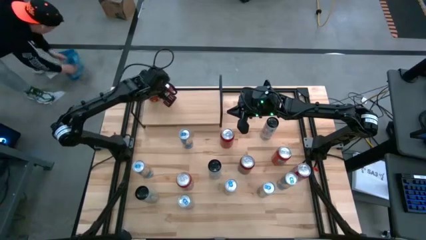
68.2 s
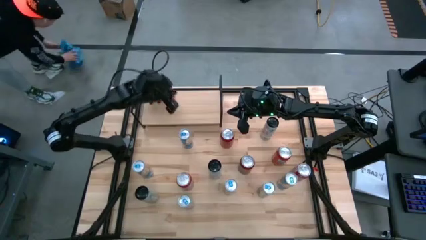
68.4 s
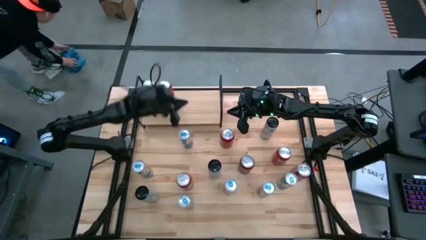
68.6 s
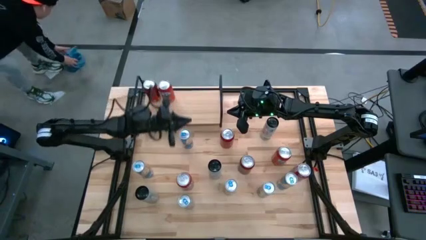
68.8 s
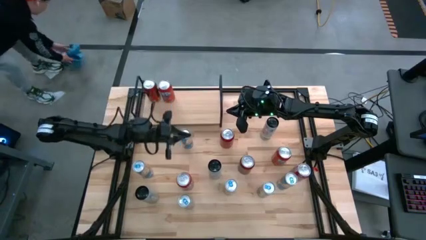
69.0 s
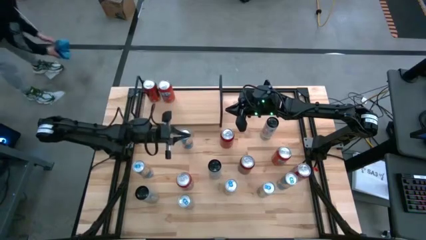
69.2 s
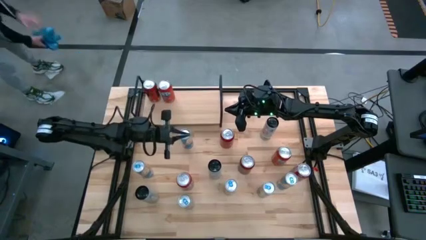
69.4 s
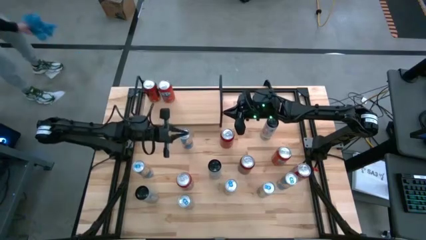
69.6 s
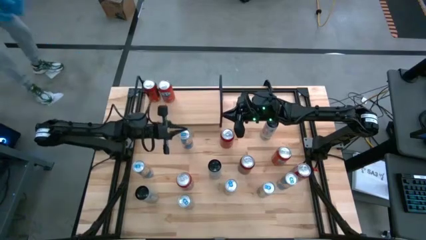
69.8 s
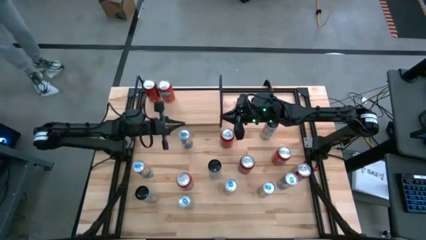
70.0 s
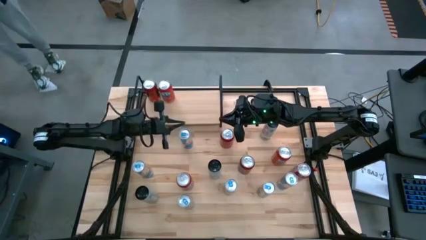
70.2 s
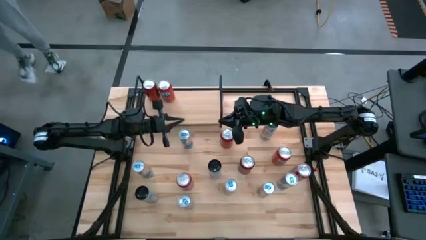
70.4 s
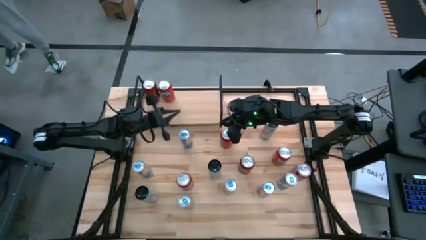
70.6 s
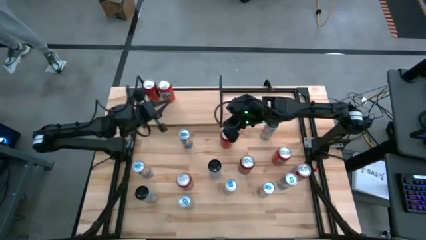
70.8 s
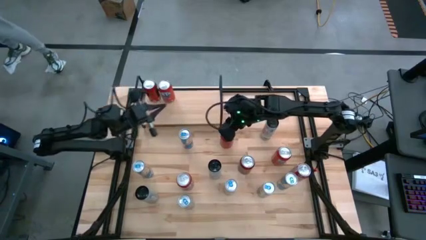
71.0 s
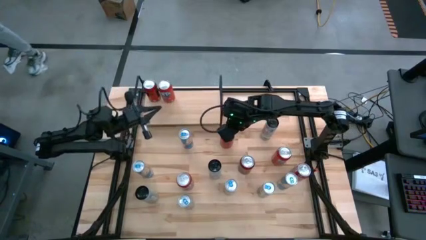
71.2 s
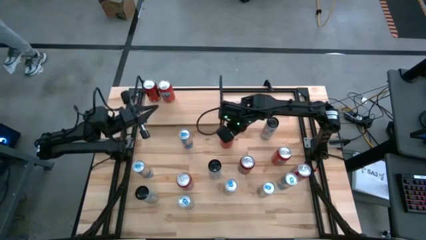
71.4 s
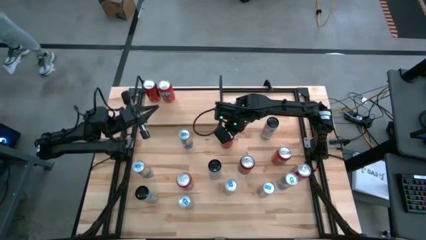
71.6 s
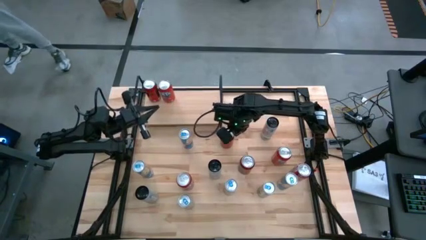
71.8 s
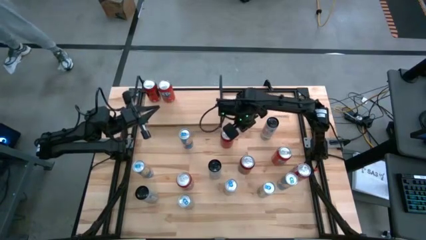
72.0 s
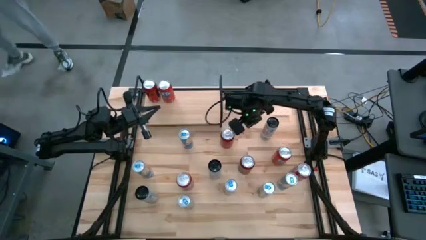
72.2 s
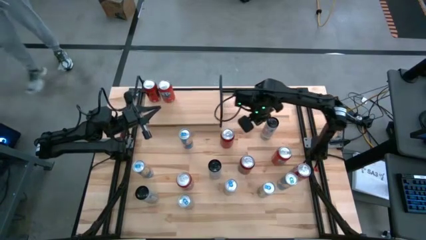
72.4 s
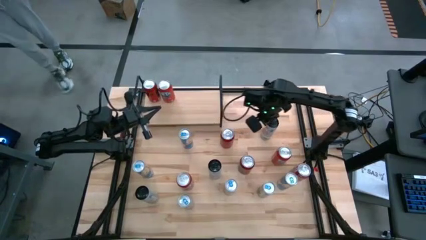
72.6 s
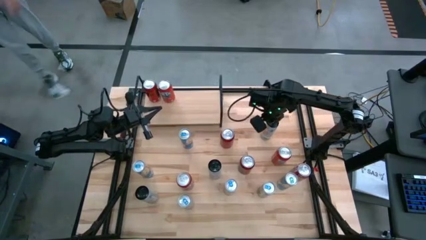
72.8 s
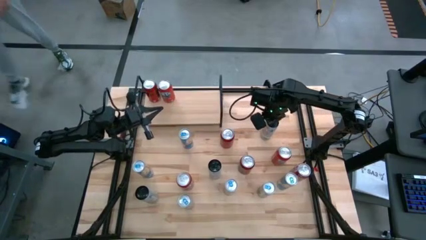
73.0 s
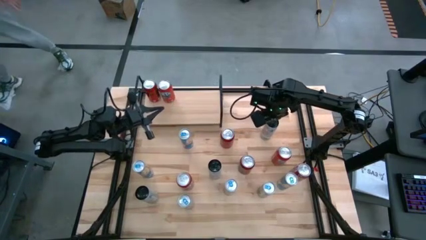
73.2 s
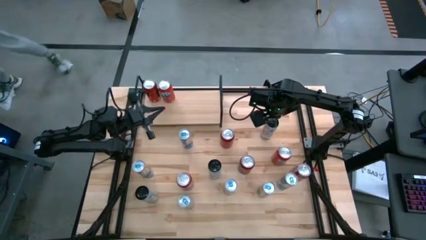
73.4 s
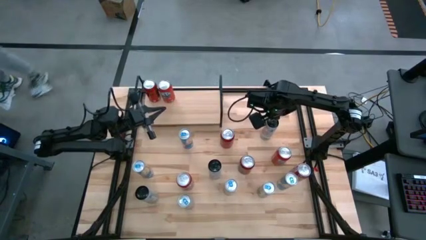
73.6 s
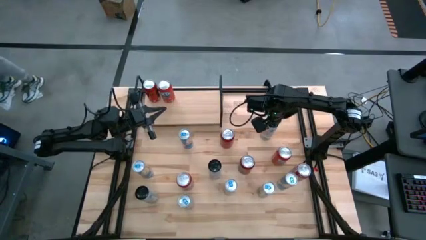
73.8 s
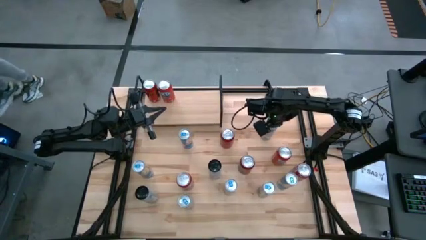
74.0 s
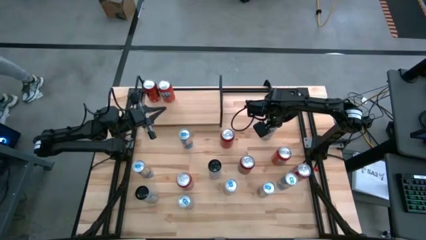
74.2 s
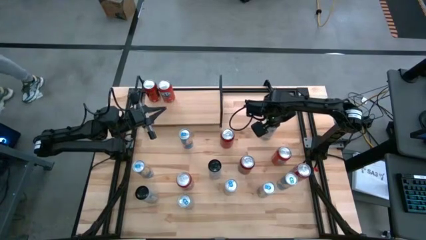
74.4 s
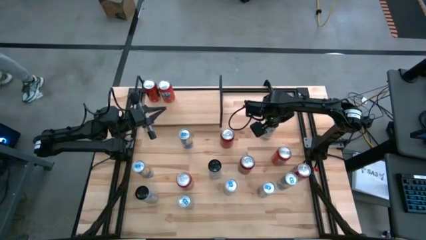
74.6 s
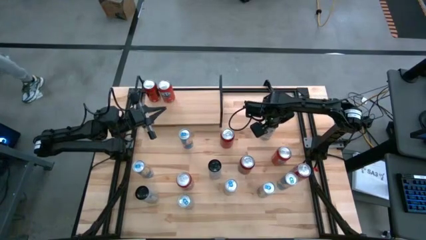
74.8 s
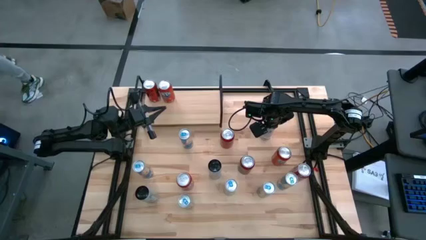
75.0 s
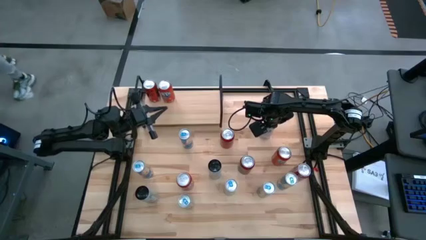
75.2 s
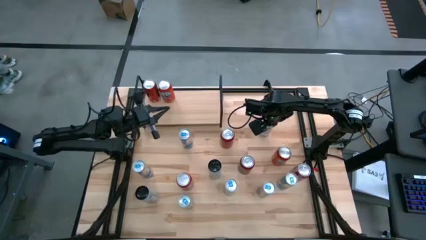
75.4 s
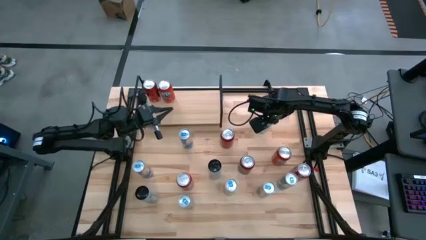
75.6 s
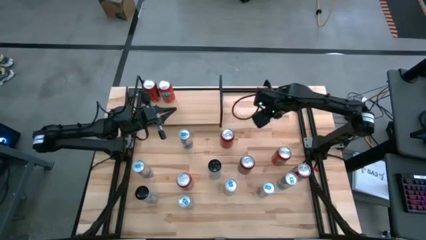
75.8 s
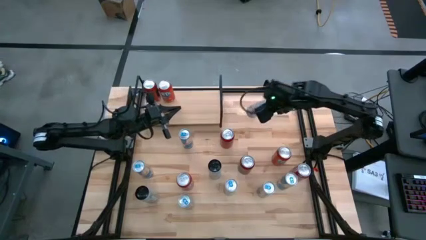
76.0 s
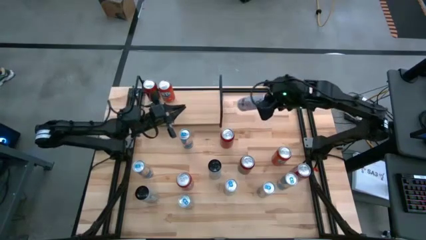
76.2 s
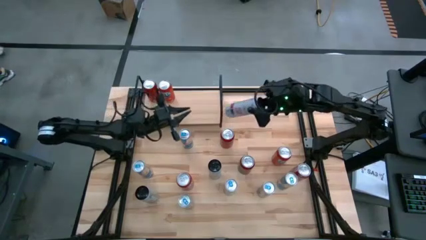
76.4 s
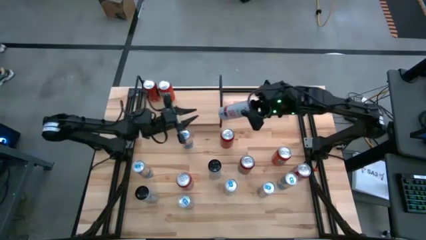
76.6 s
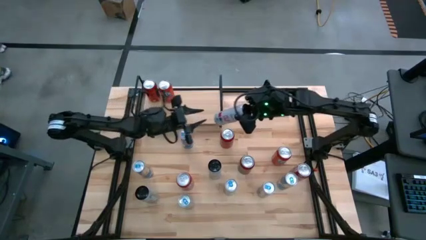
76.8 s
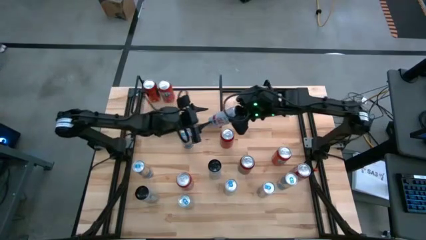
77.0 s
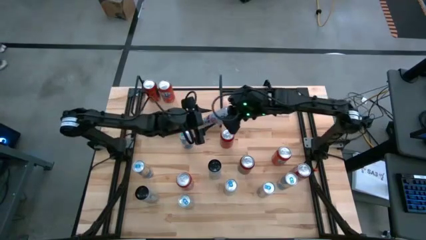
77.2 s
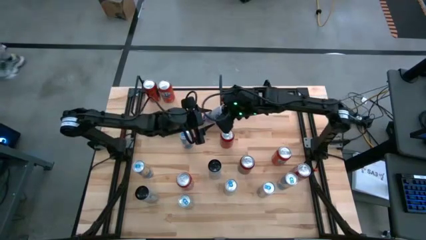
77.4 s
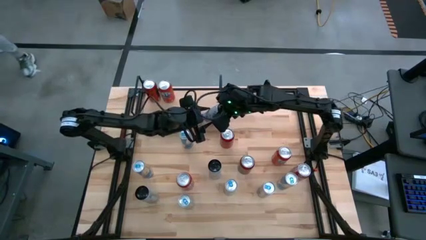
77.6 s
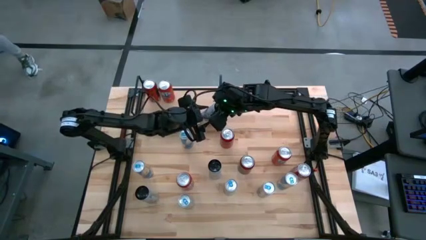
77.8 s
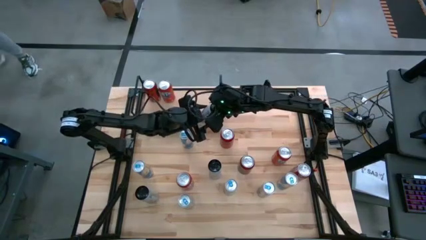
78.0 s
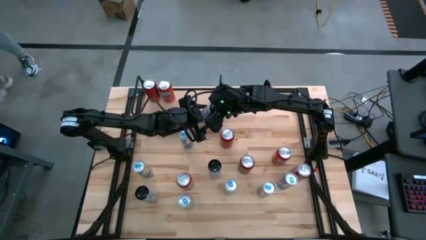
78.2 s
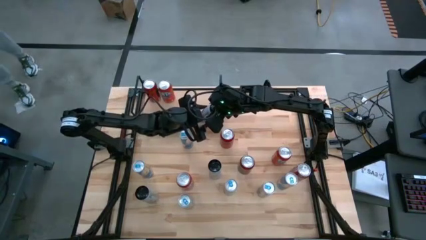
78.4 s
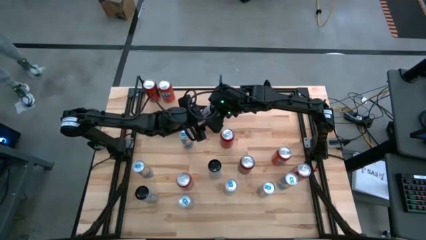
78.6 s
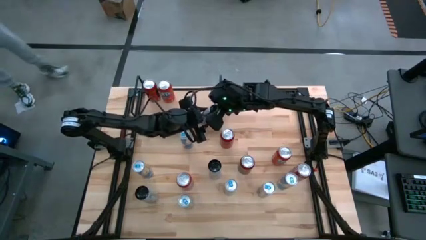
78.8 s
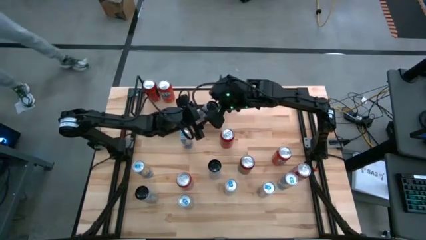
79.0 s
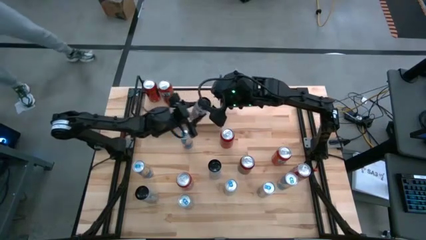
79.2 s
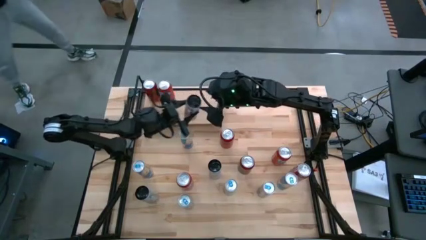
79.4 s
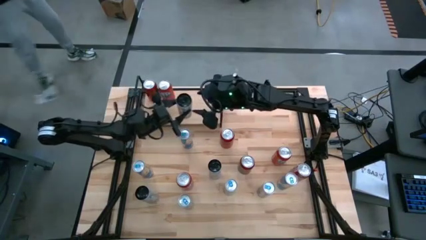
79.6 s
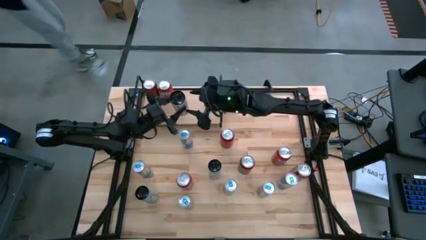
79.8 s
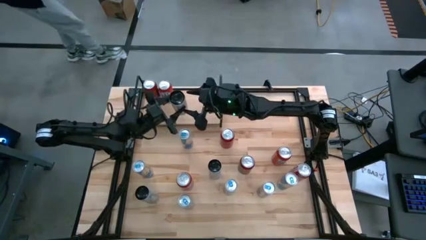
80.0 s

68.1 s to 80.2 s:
Task: Place canned beverage on shelf
Put the white/pink soda can on the shelf
